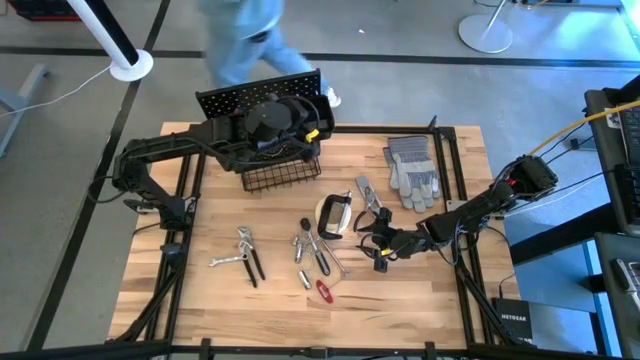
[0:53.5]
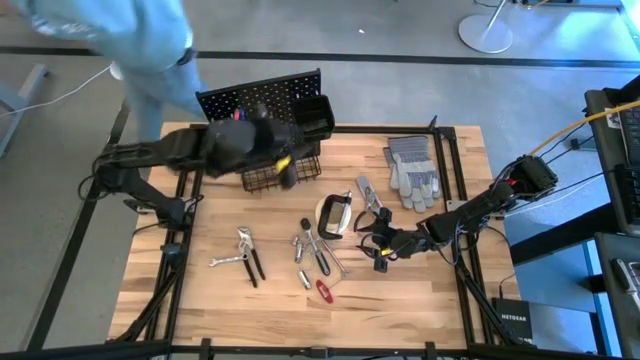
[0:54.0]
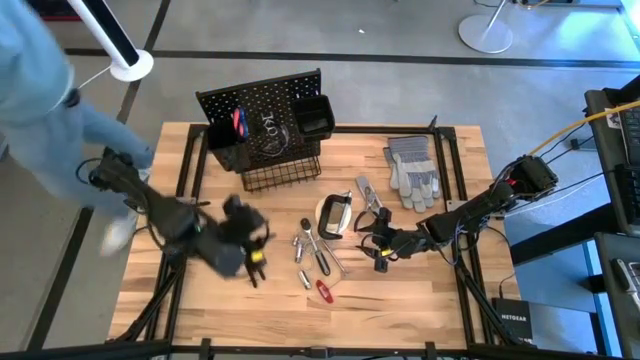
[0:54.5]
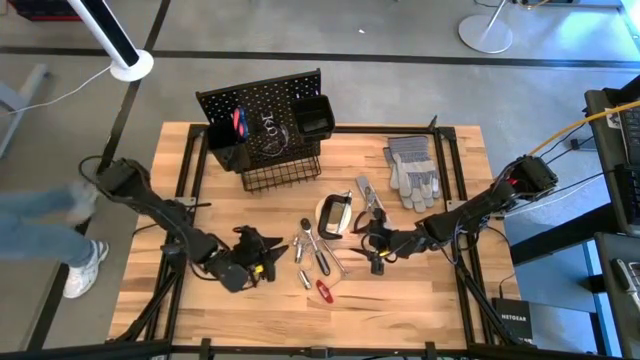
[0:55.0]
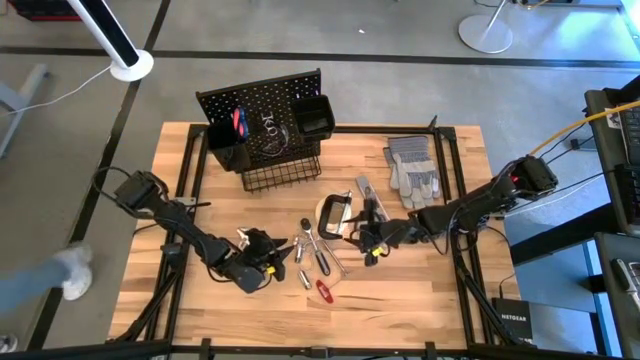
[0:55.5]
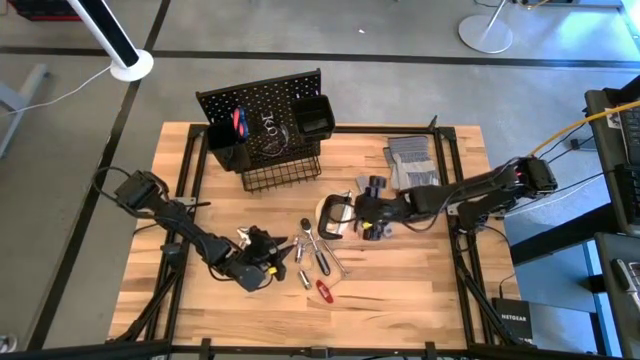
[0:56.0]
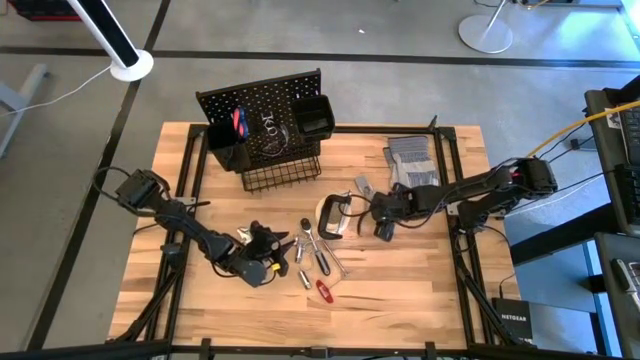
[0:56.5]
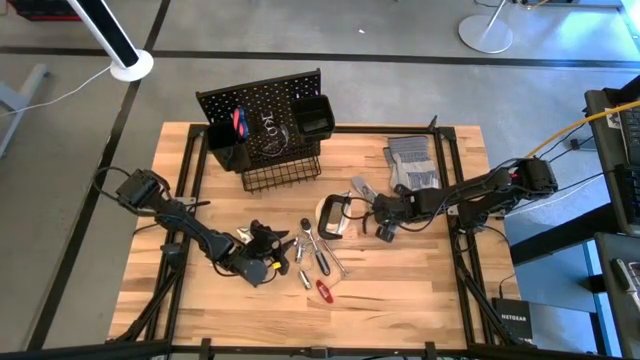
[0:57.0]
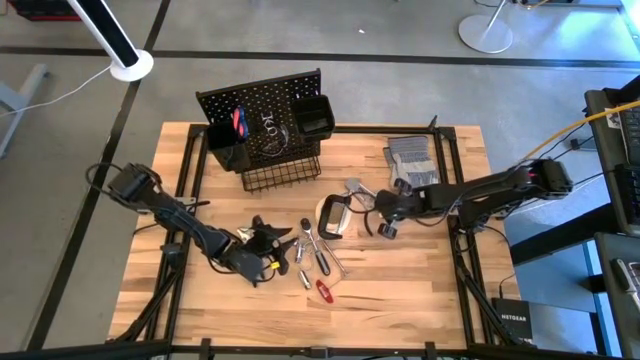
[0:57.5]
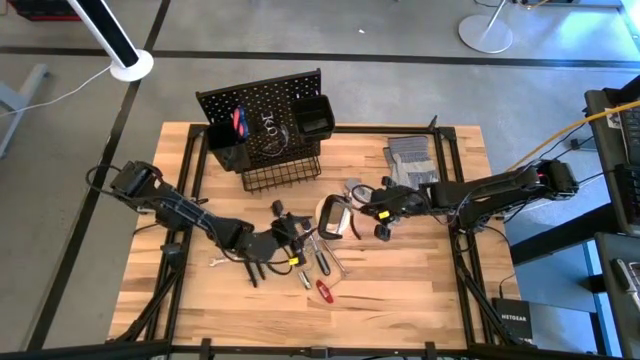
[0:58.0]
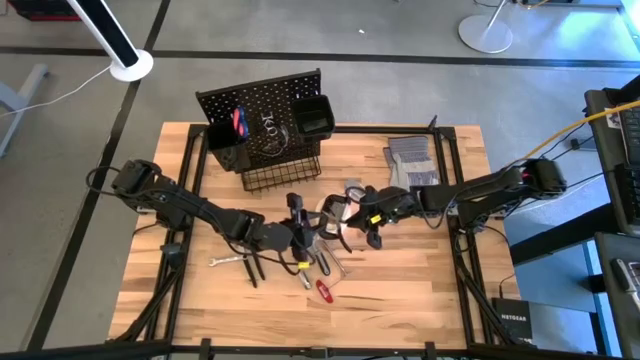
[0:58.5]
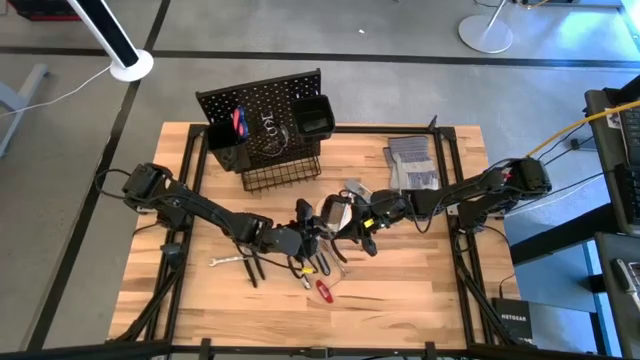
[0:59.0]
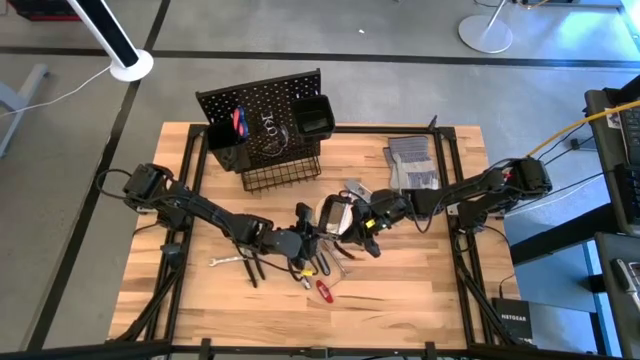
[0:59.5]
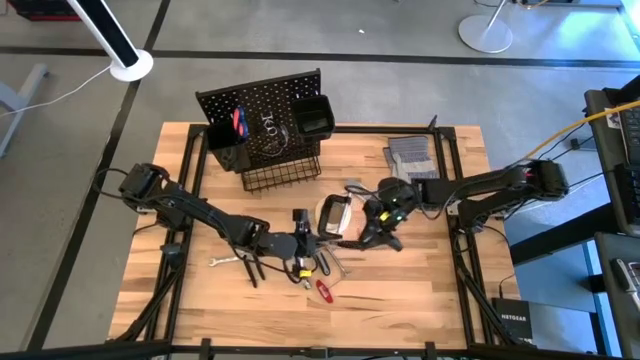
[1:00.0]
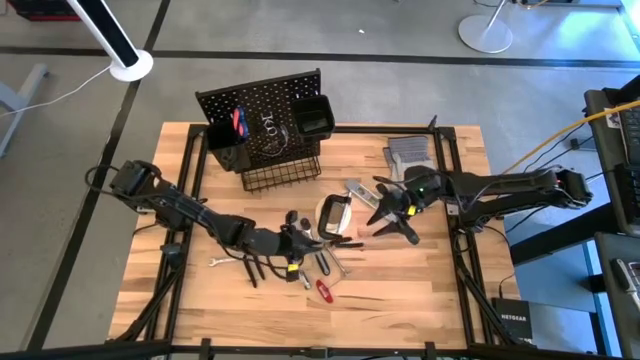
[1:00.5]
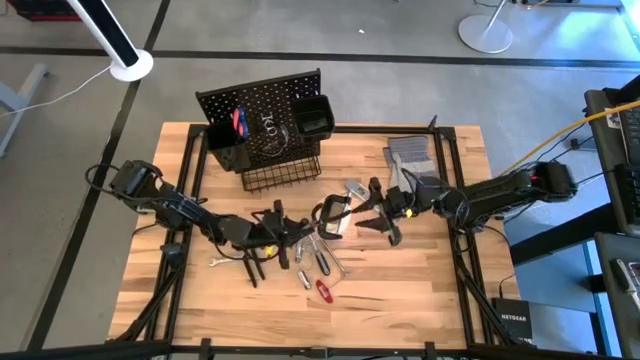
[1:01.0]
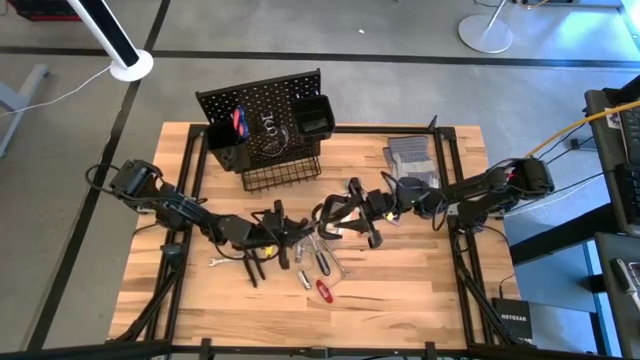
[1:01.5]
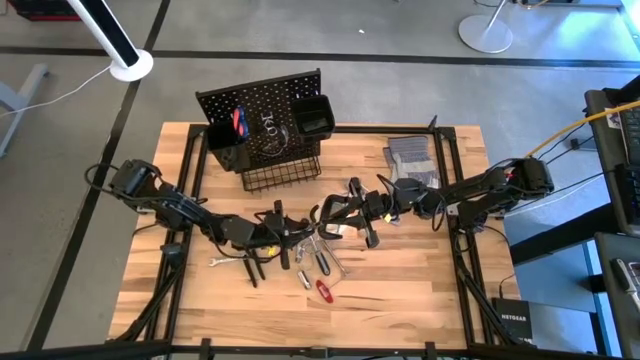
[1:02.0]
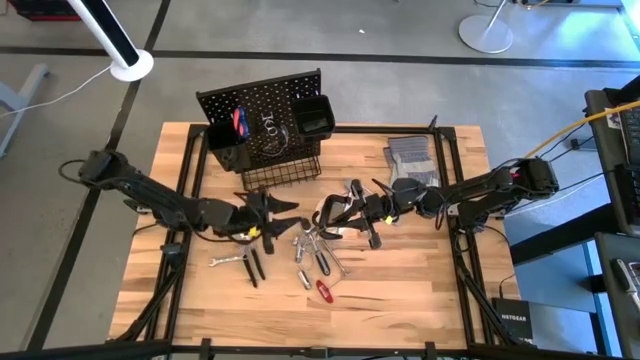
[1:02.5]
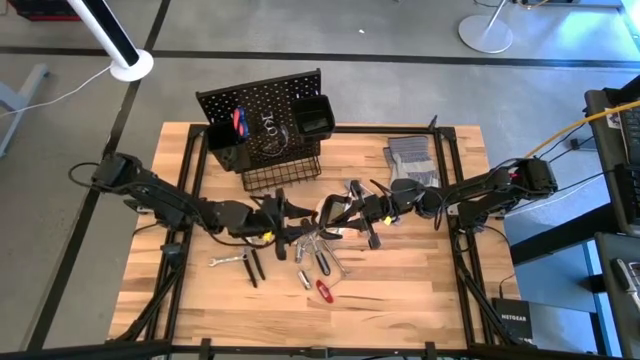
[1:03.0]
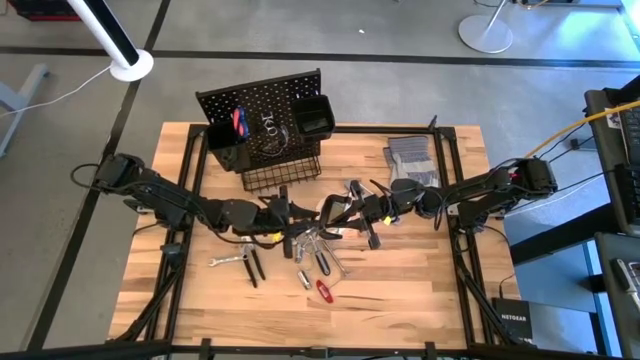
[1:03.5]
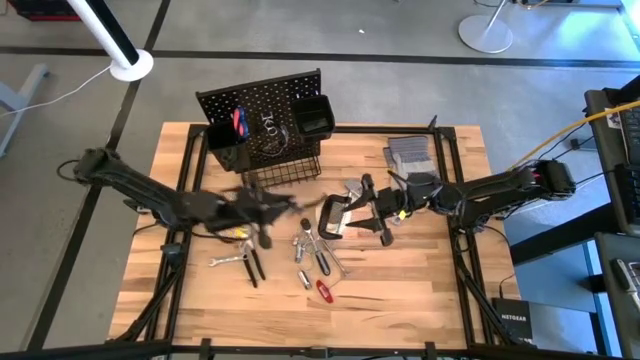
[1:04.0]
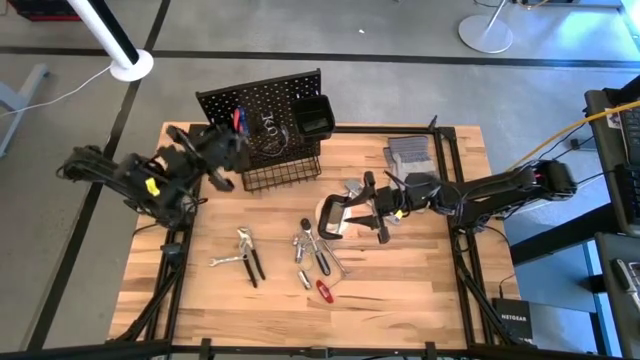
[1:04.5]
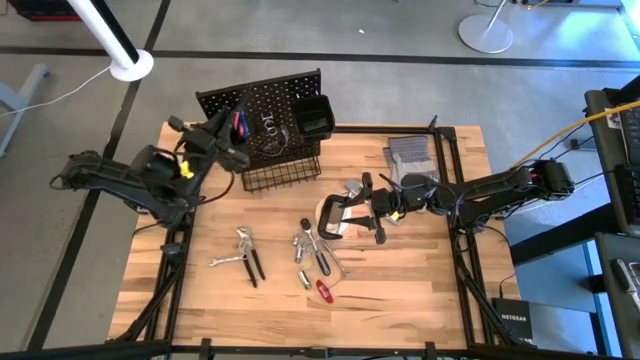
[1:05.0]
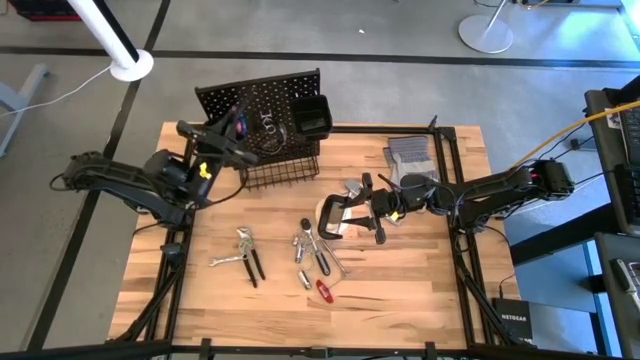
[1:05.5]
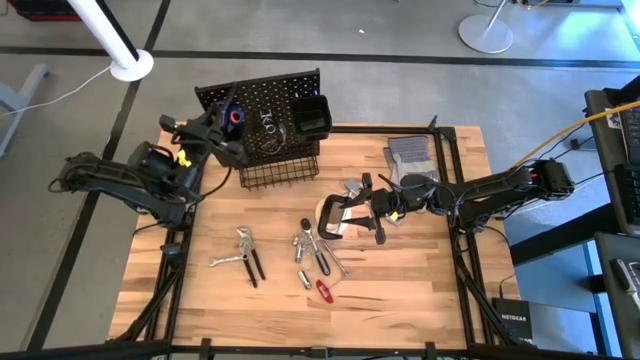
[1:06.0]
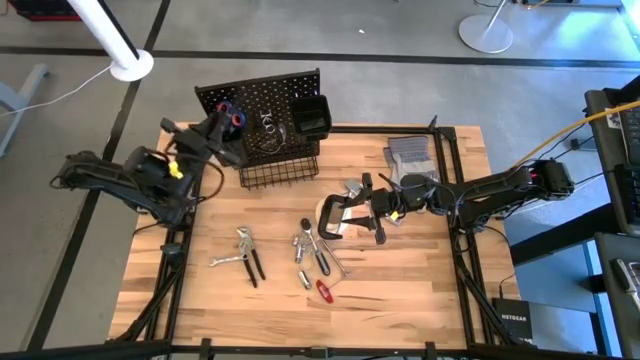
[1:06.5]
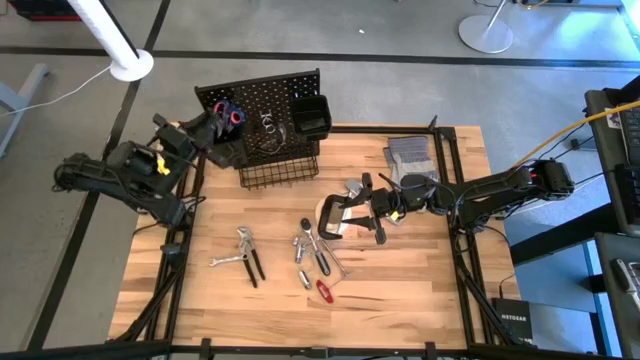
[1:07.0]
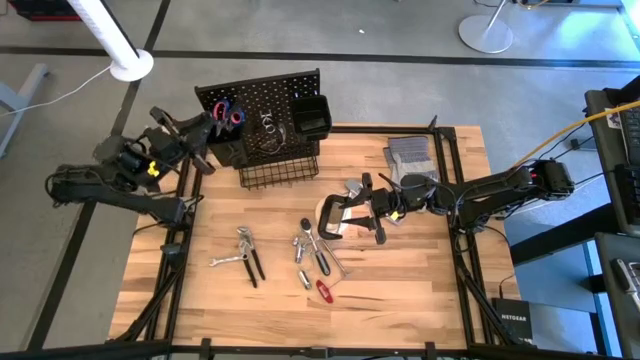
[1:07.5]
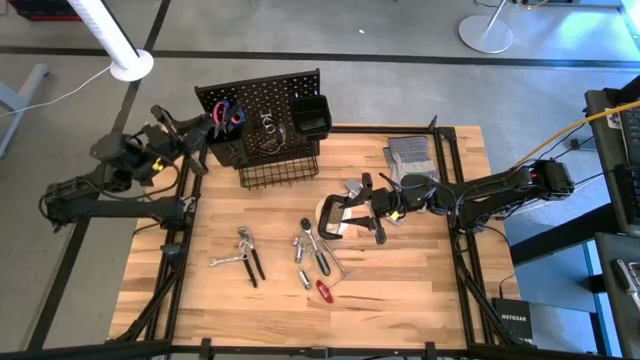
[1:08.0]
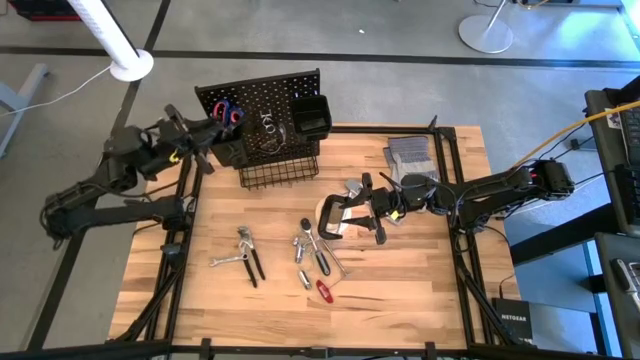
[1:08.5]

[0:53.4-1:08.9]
Task: Hang tools onto peg board
Put the black pliers into the left black bin on the pegboard

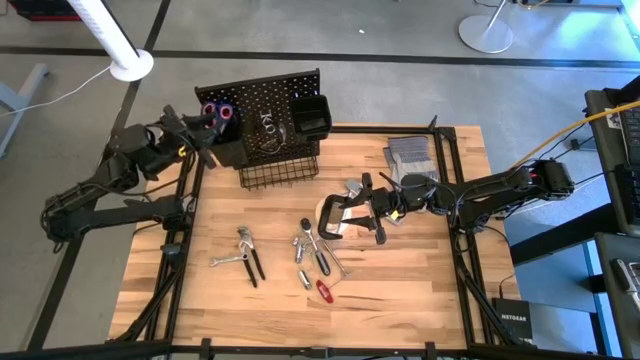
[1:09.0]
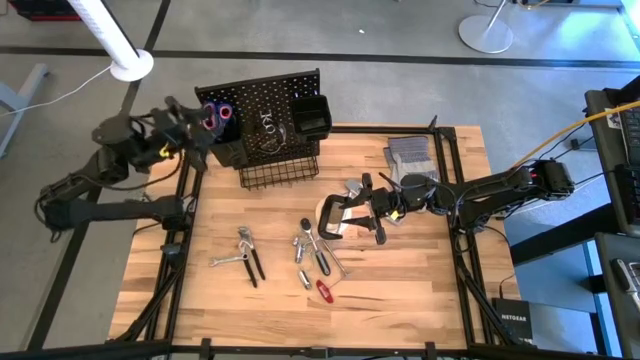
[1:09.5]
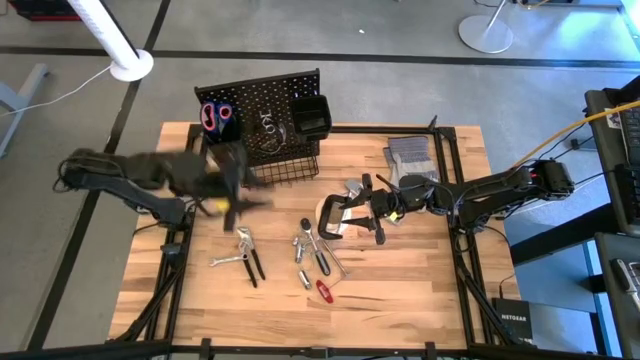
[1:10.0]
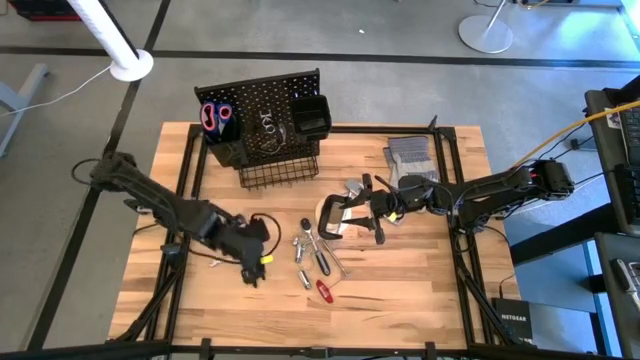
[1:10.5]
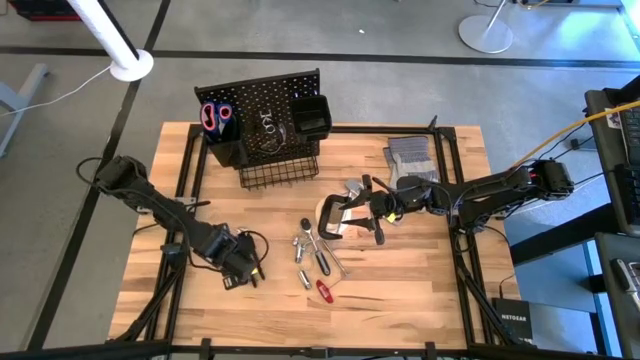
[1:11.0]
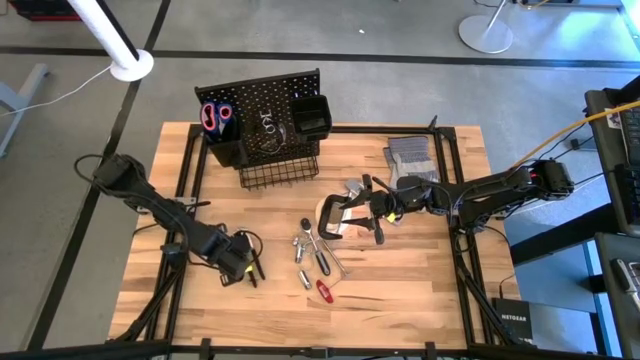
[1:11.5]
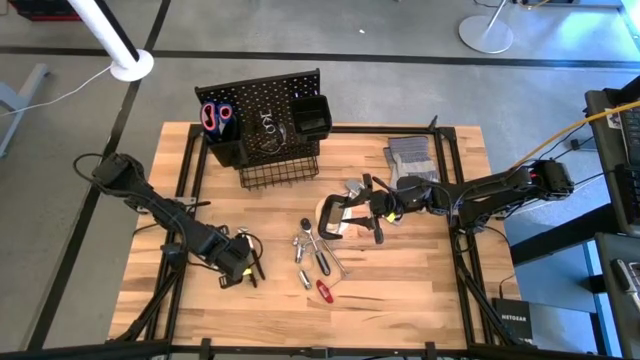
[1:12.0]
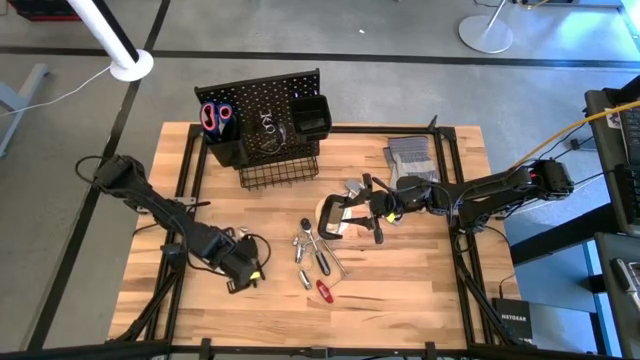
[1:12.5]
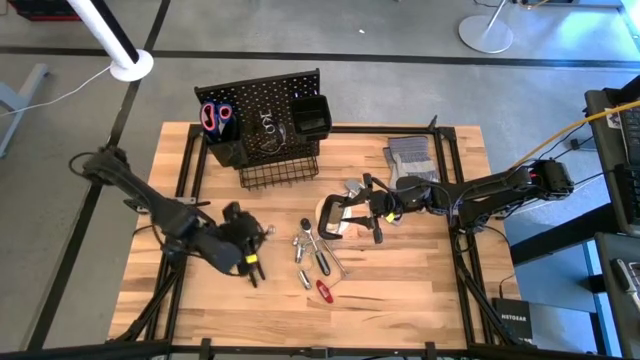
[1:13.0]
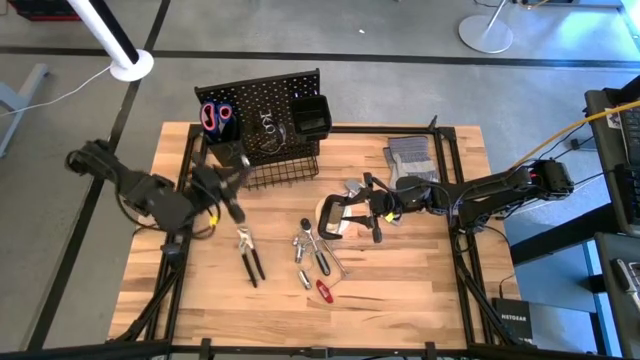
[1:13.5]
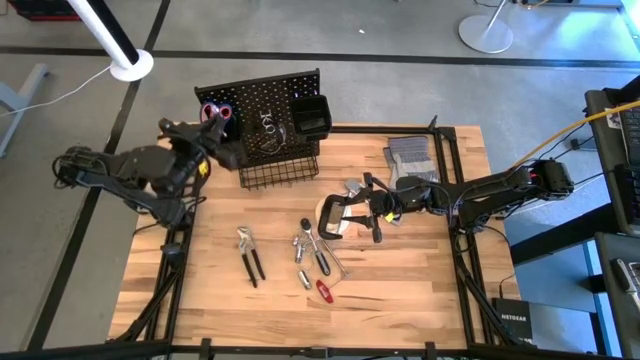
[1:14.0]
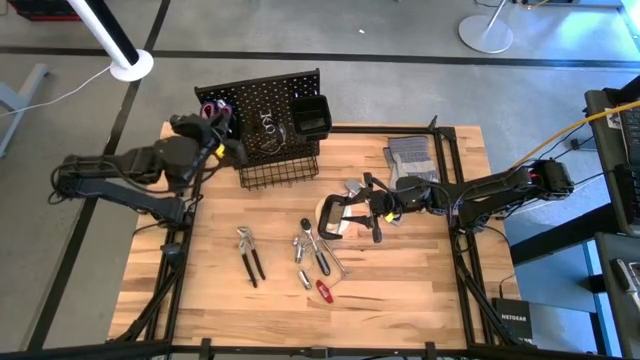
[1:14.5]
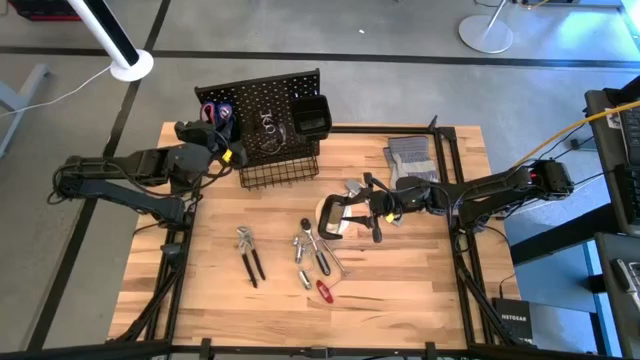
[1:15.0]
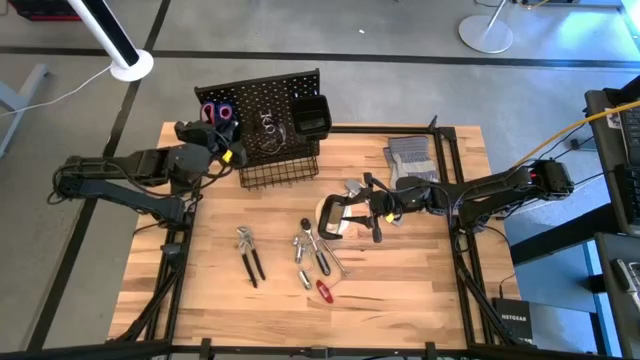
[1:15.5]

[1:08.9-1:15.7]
Put the silver wrench into the left black bin on the pegboard
